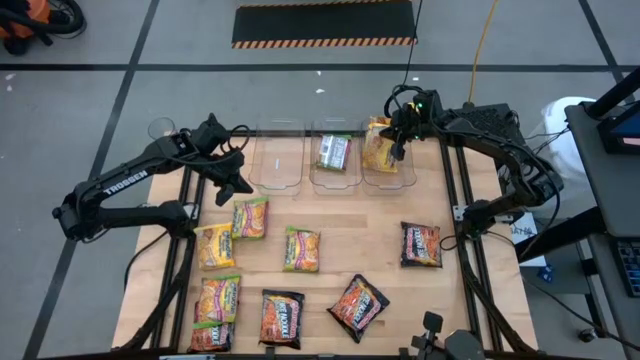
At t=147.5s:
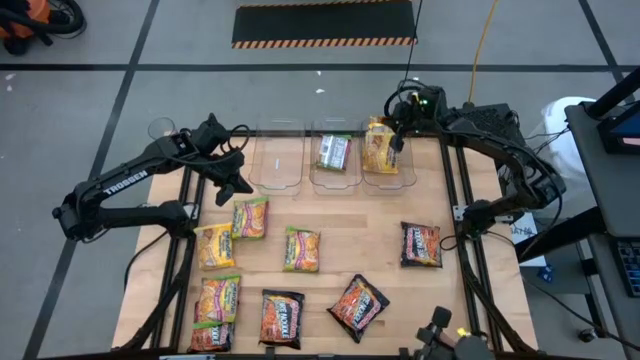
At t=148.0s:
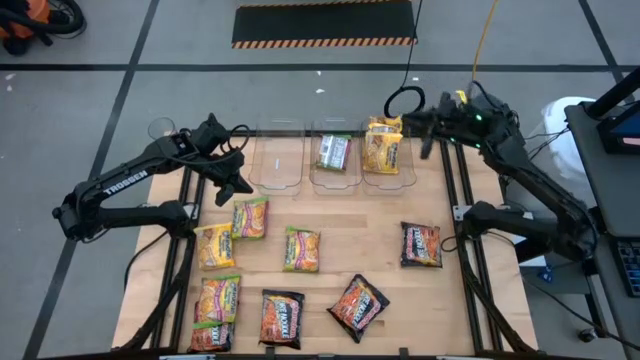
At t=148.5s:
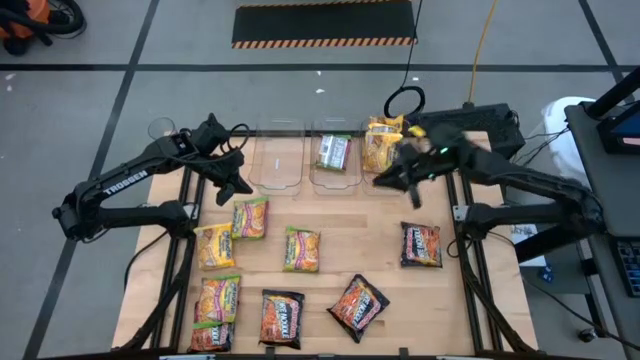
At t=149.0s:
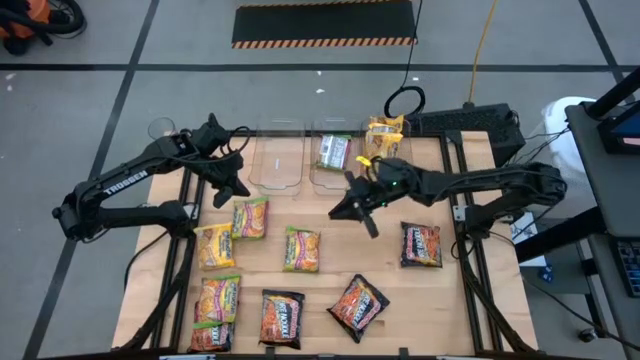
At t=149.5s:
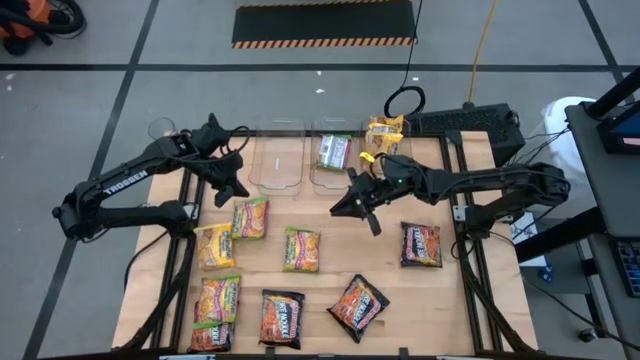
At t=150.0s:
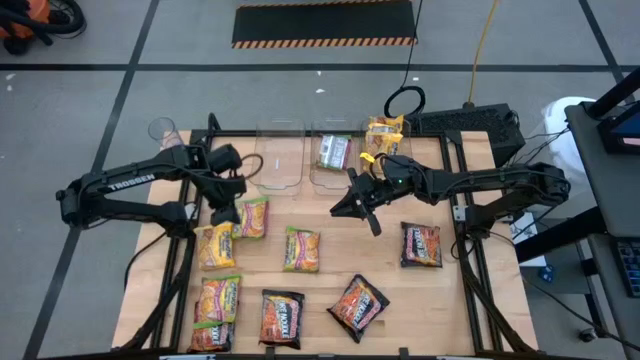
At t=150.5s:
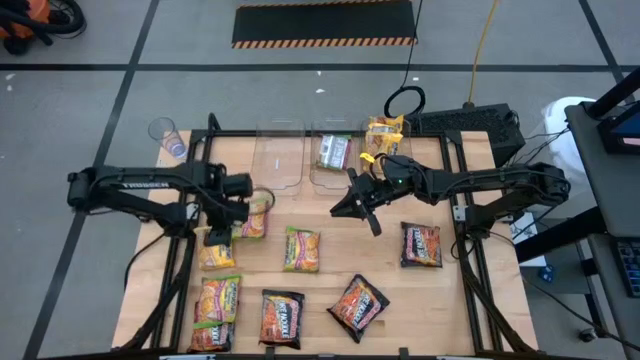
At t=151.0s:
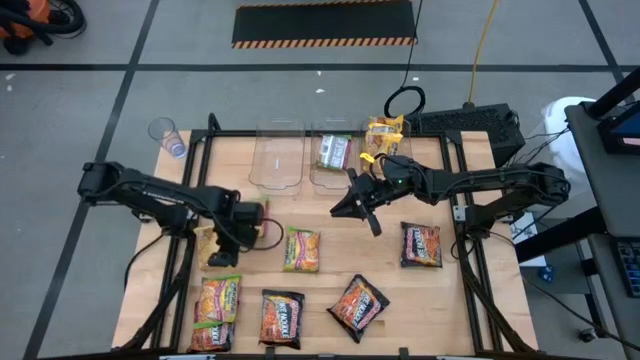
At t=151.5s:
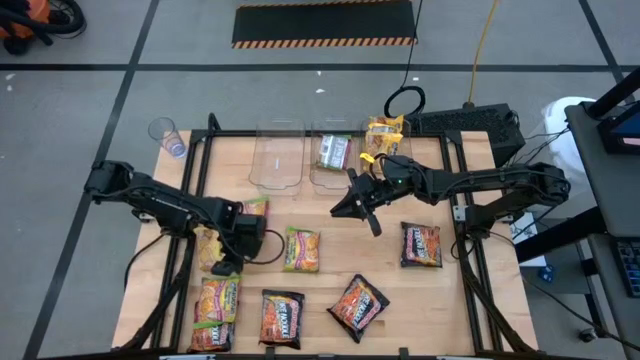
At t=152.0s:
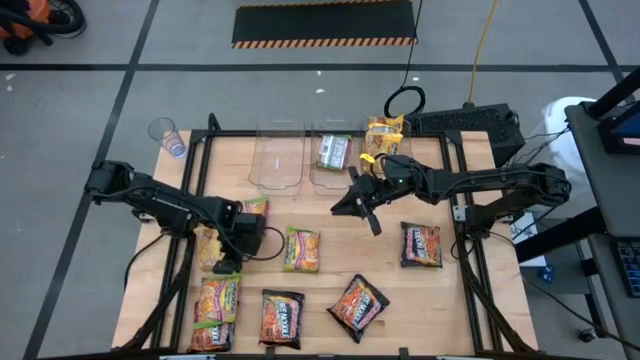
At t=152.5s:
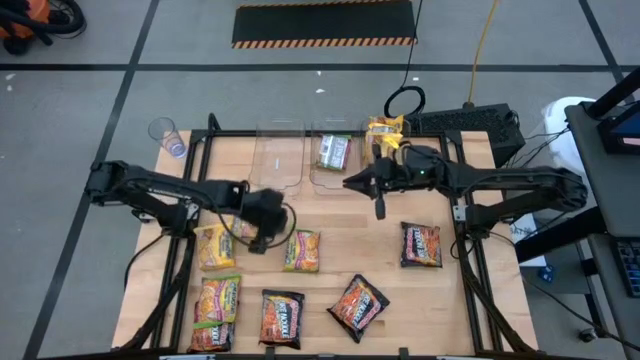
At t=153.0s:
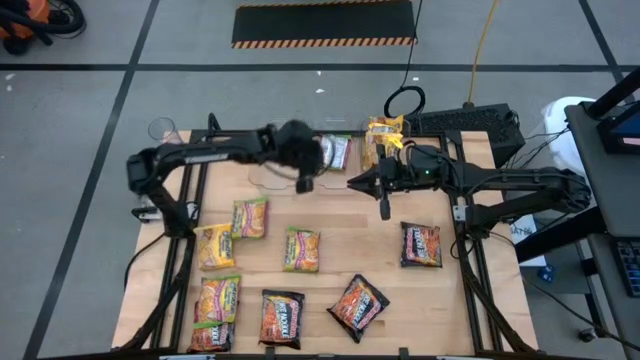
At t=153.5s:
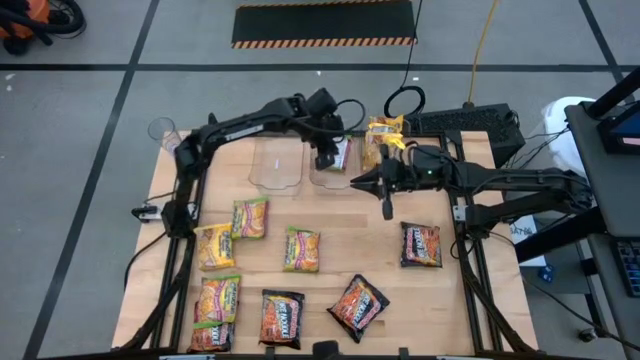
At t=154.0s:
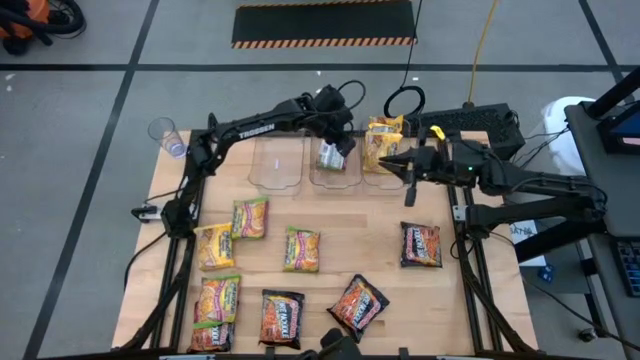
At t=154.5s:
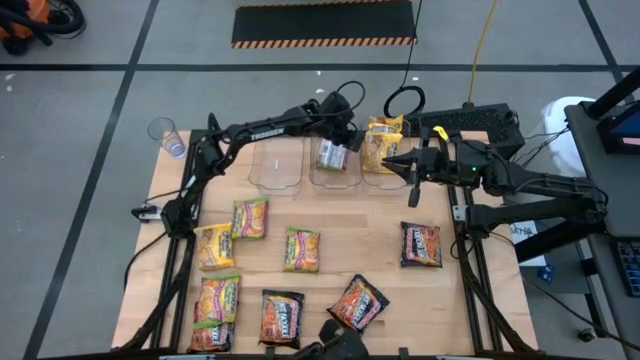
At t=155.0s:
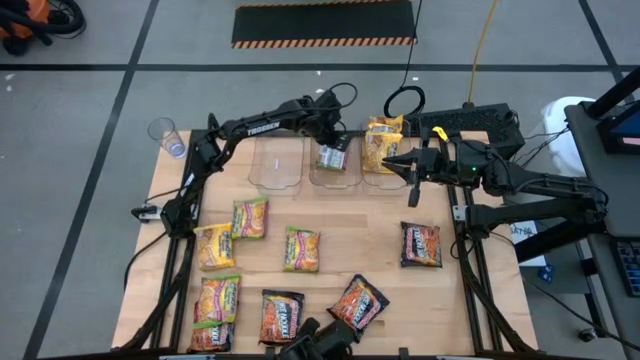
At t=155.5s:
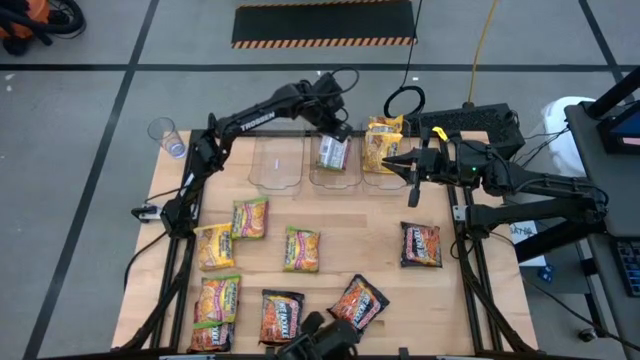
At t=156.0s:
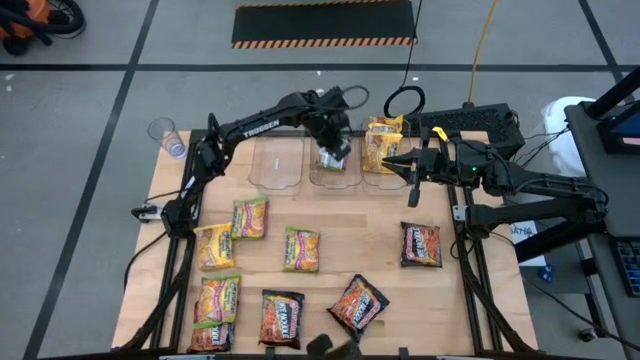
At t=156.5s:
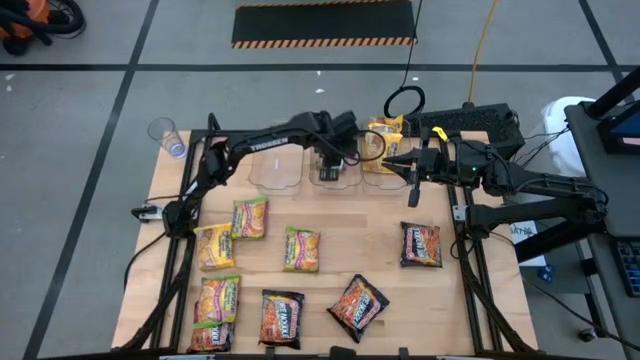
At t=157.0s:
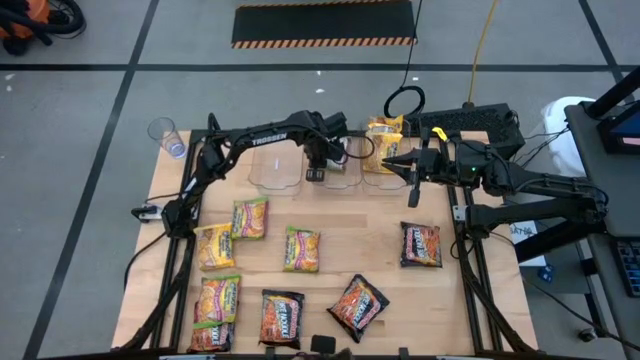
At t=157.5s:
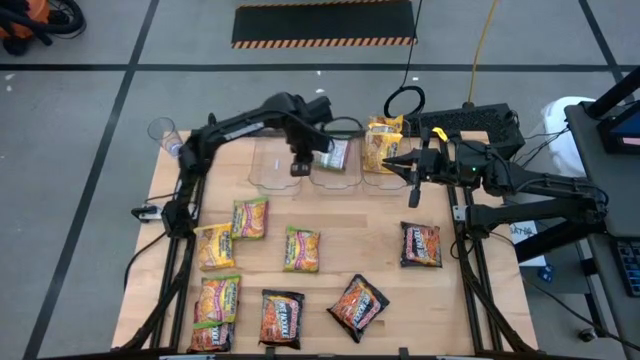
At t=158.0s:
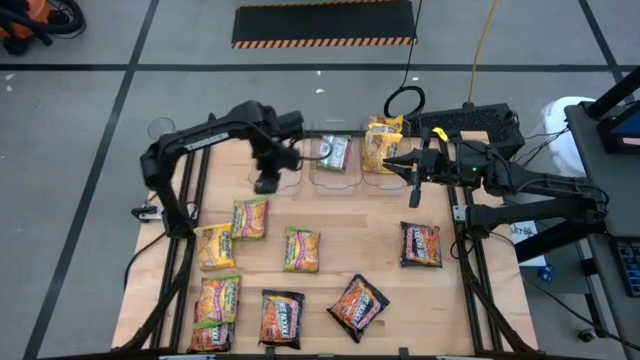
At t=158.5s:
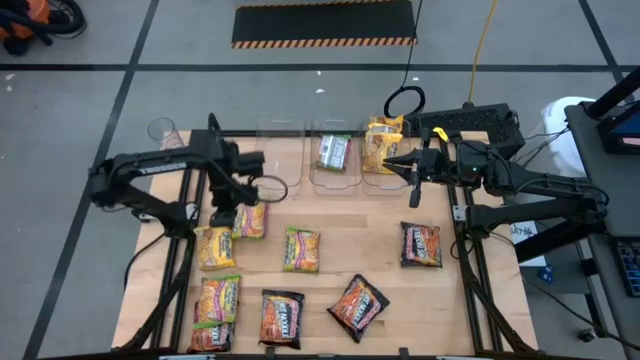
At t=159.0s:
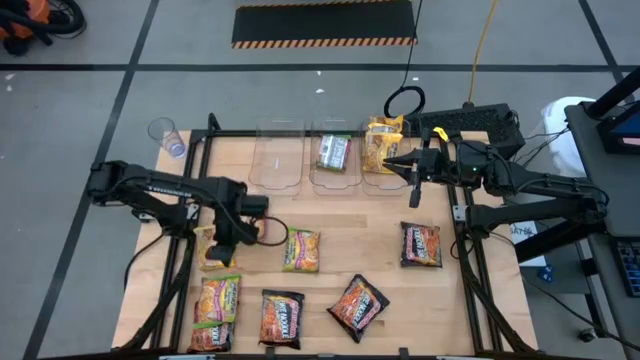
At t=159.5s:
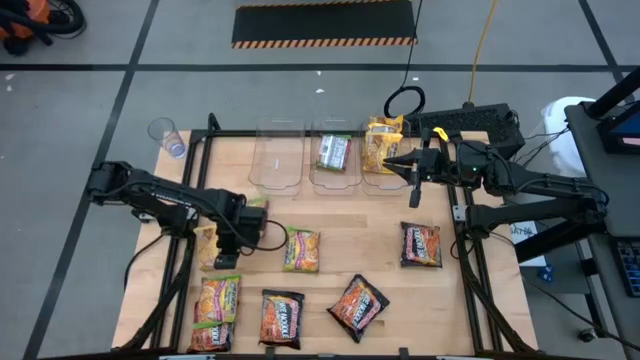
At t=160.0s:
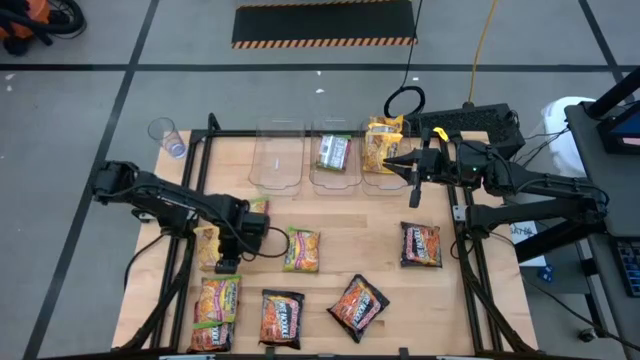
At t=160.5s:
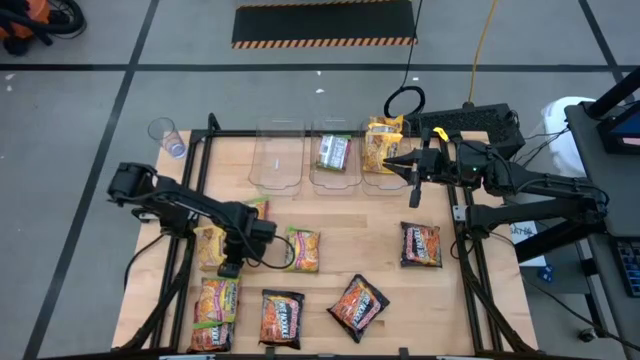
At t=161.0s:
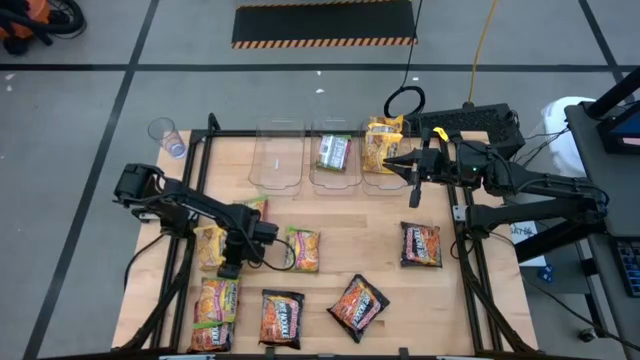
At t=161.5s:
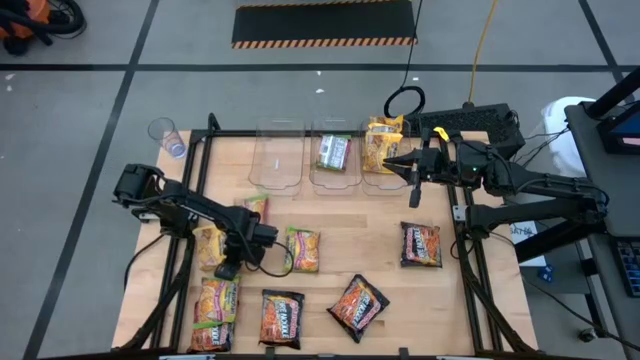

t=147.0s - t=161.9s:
Task: Sort Maruchan noodles
Put the green noodle pack into the center transparent bin

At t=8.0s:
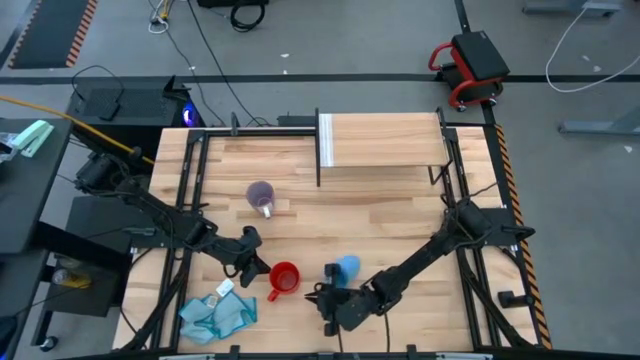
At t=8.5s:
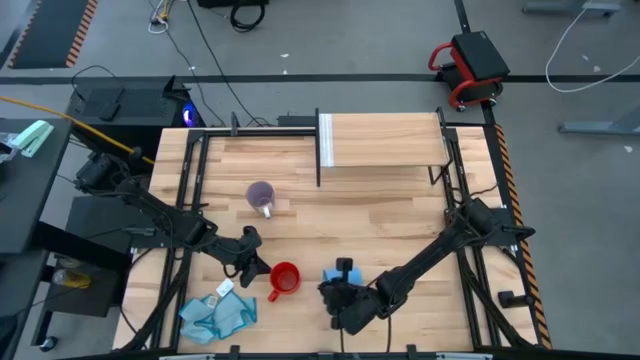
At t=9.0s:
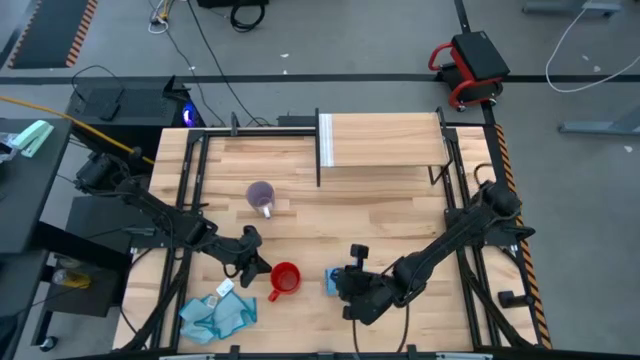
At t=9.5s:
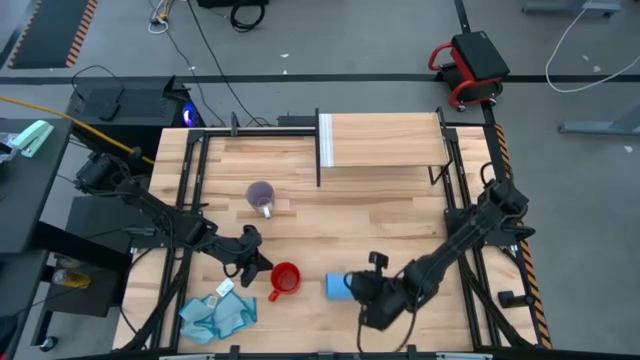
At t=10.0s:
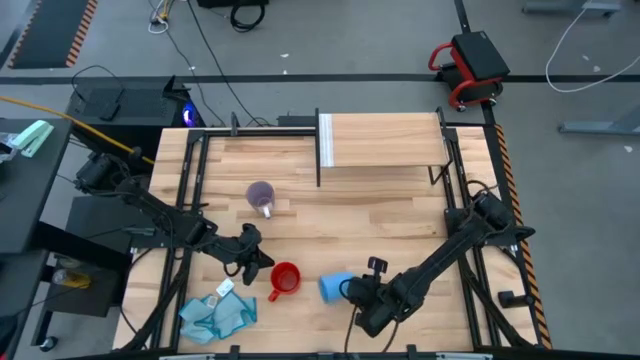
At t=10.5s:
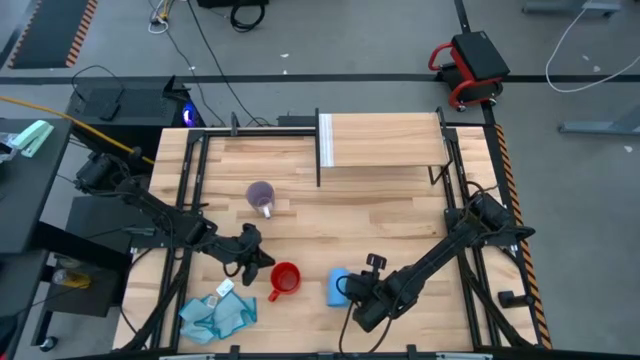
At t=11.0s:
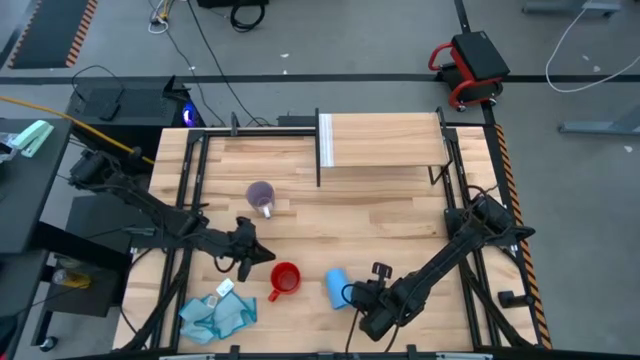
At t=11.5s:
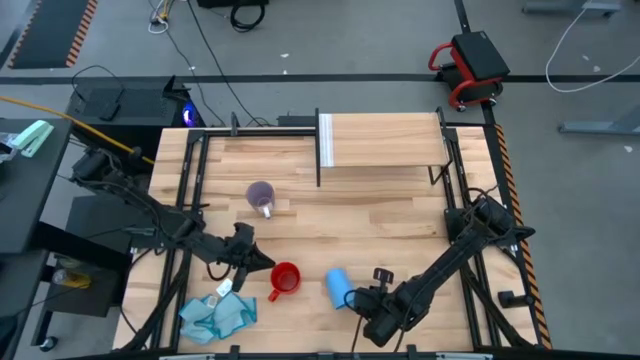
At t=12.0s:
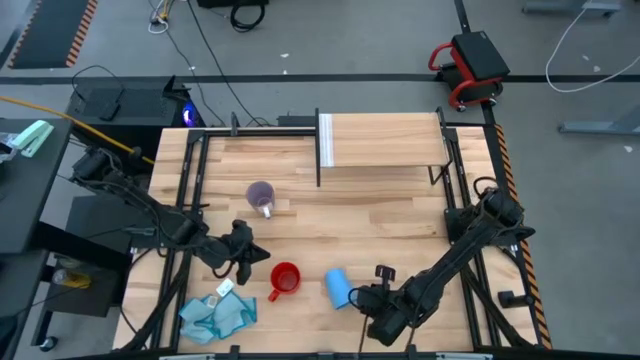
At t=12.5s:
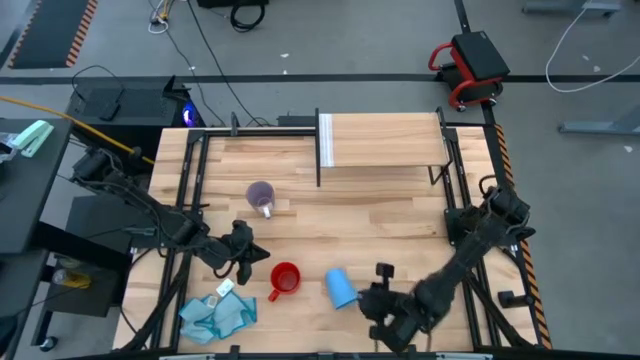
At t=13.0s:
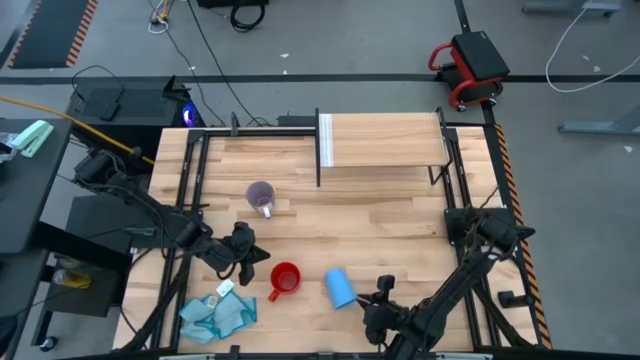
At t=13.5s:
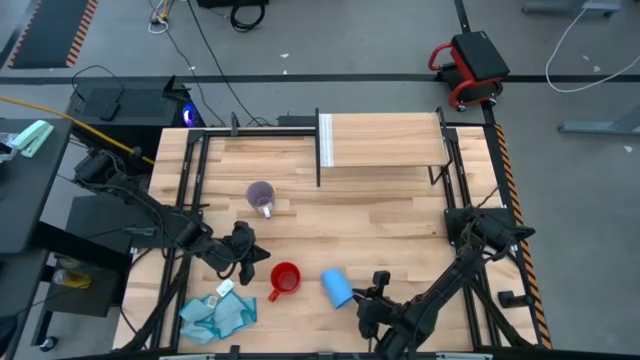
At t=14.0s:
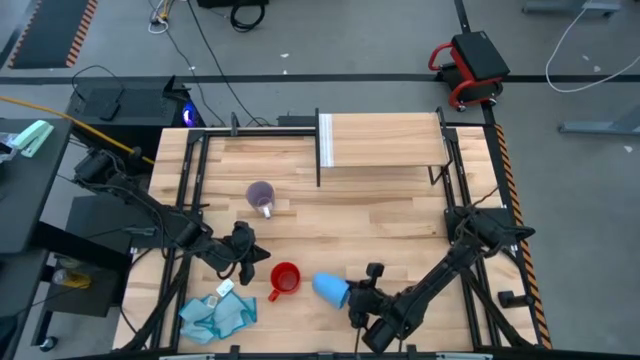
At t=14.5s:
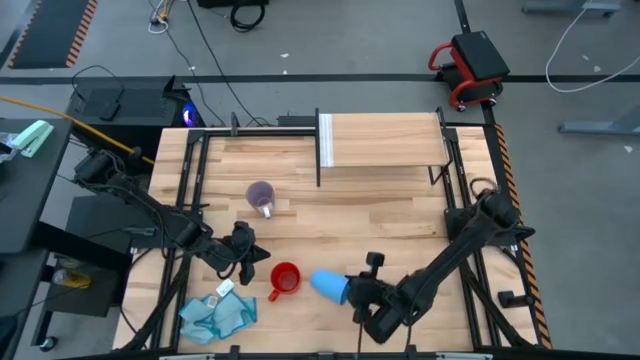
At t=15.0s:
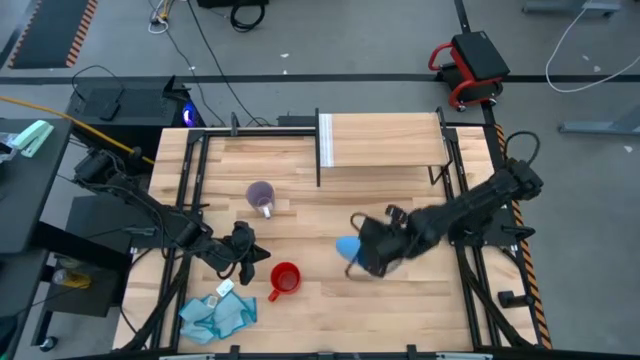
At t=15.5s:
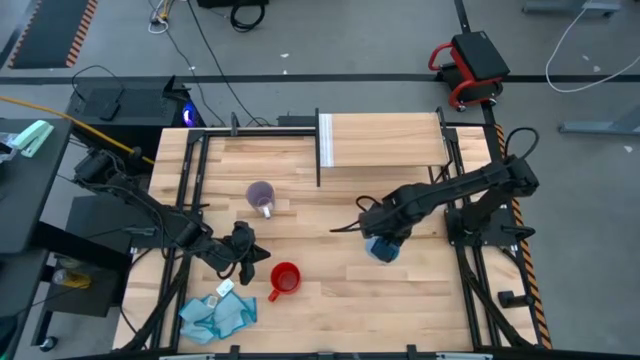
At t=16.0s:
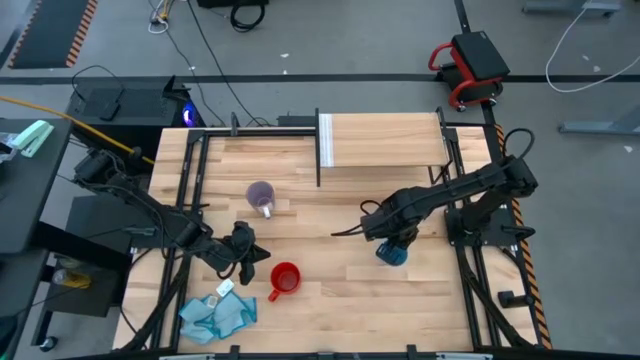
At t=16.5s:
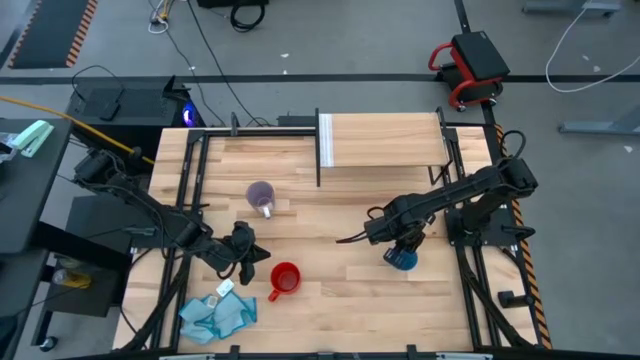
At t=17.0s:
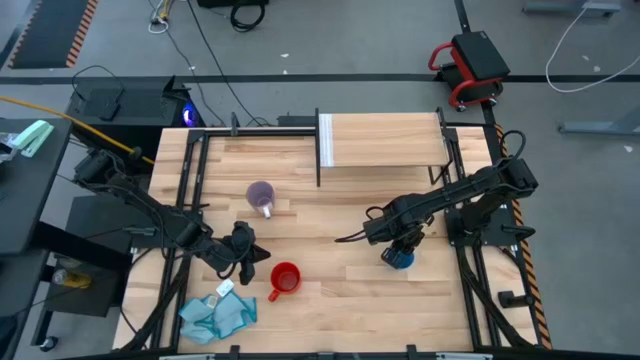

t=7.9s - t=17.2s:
Task: Stack small to large cups/mugs on shelf
Adjust the blue cup
